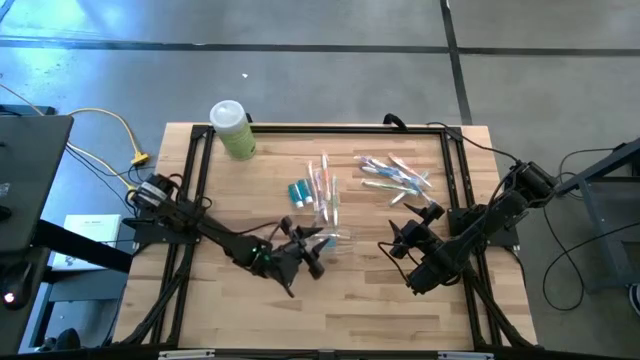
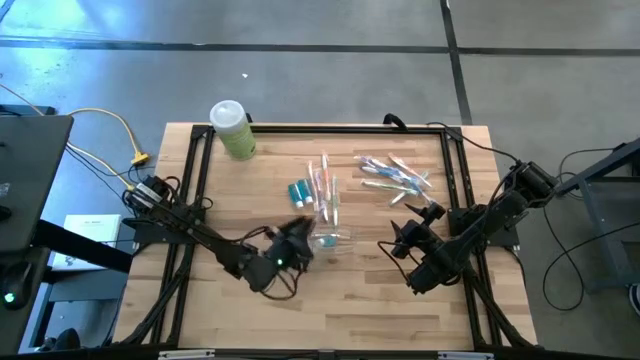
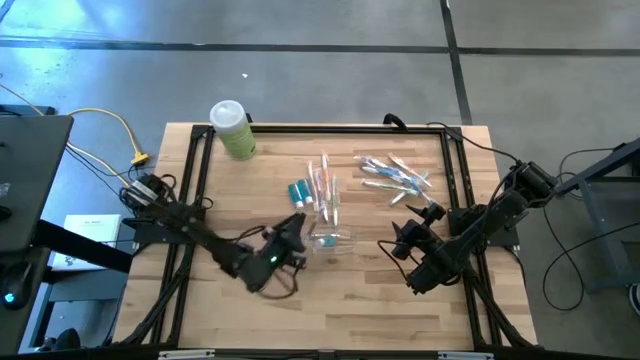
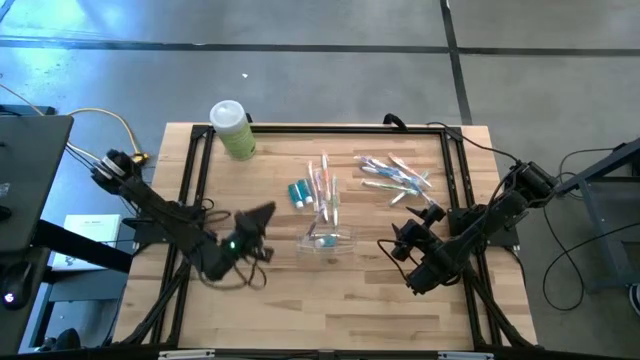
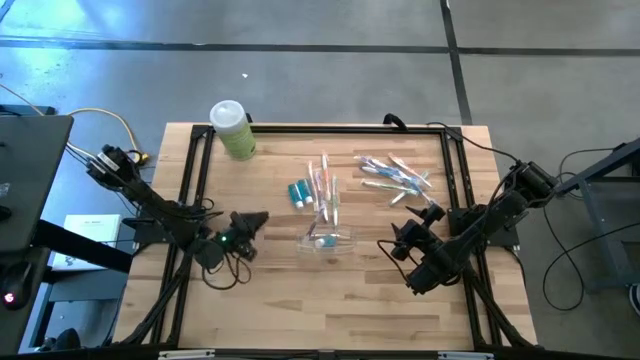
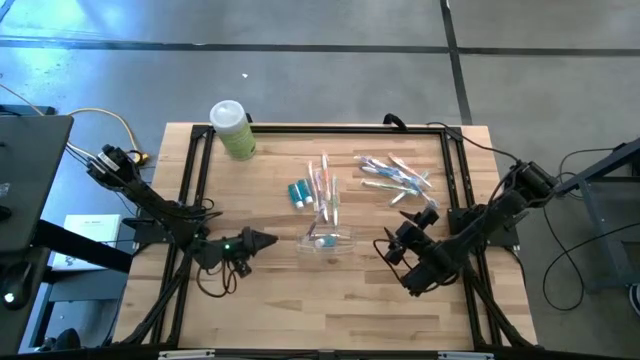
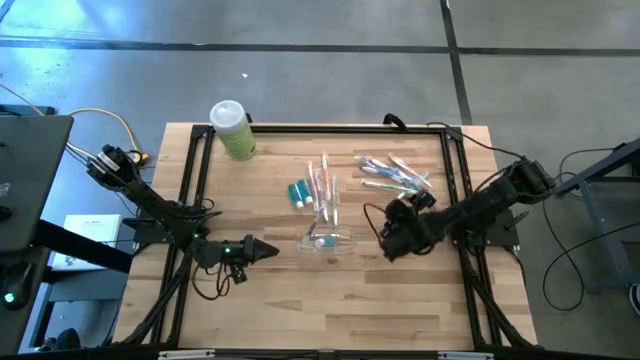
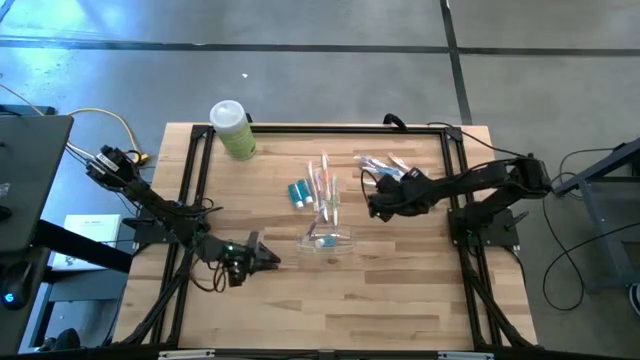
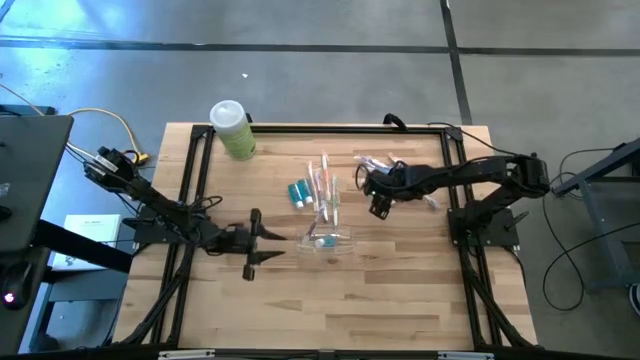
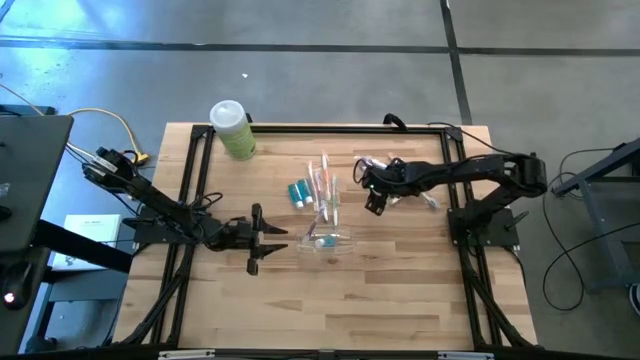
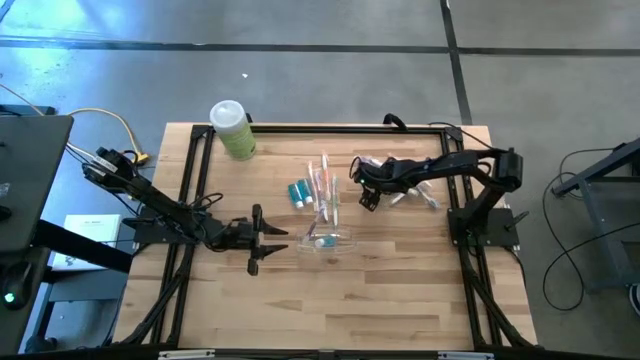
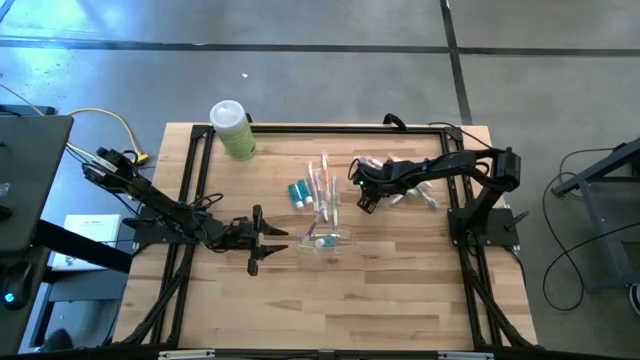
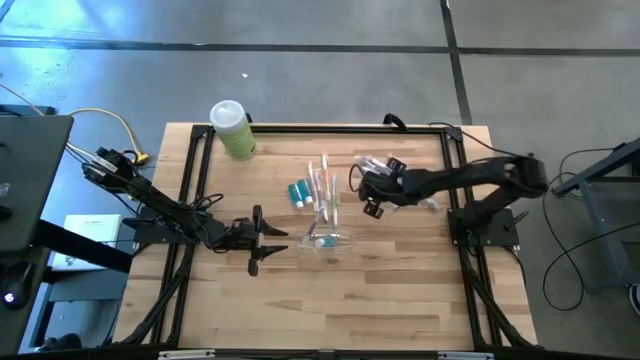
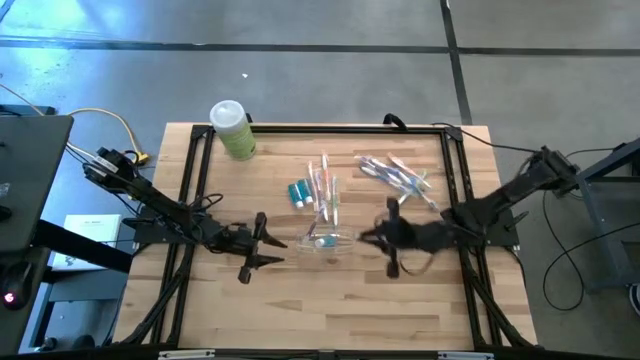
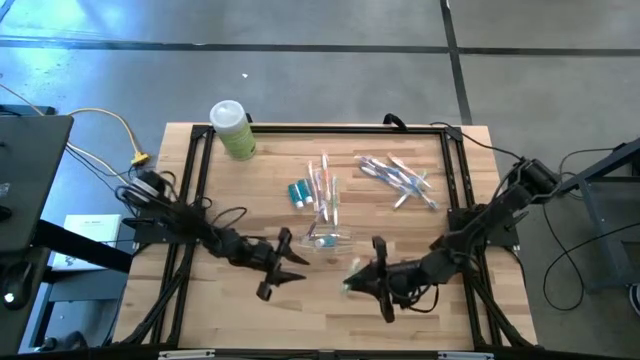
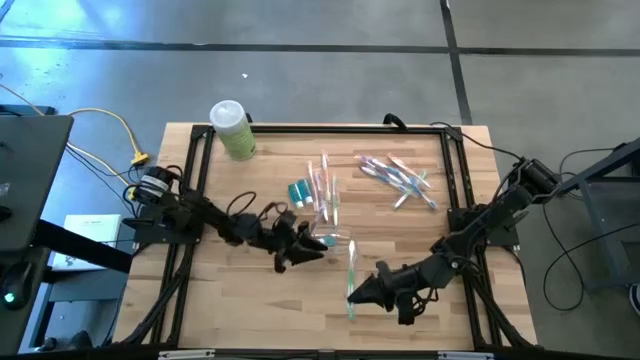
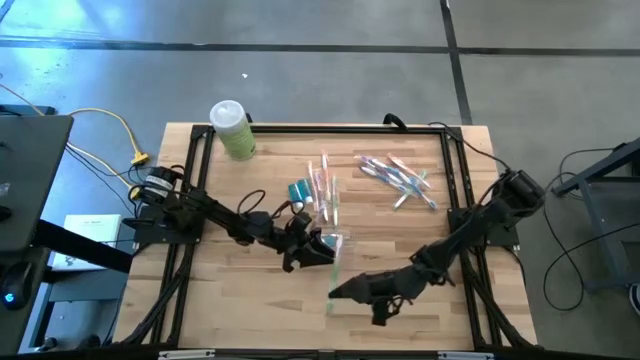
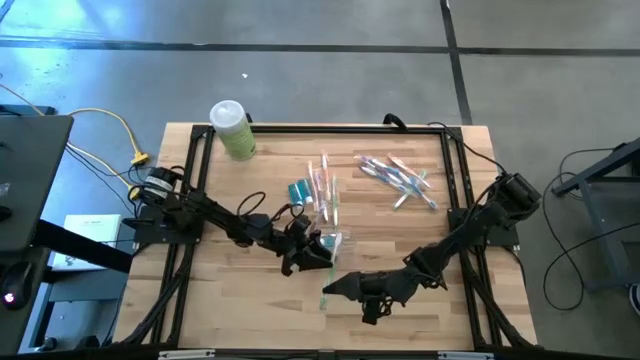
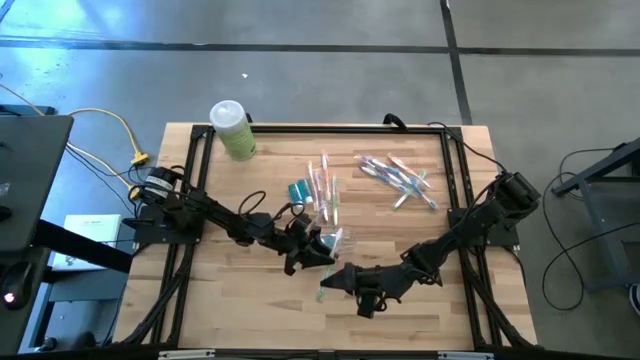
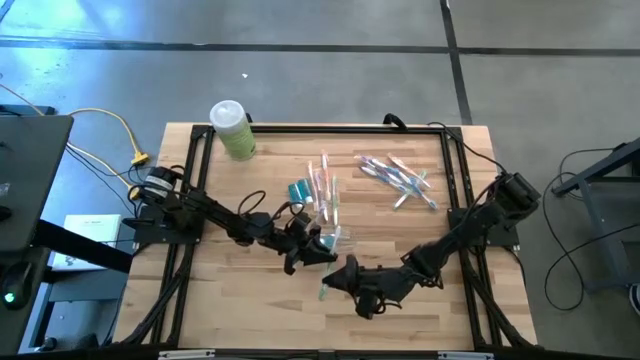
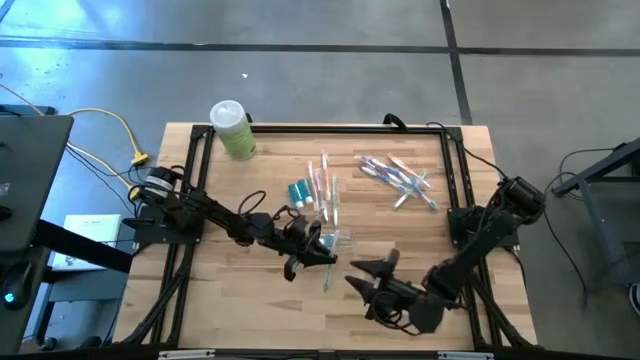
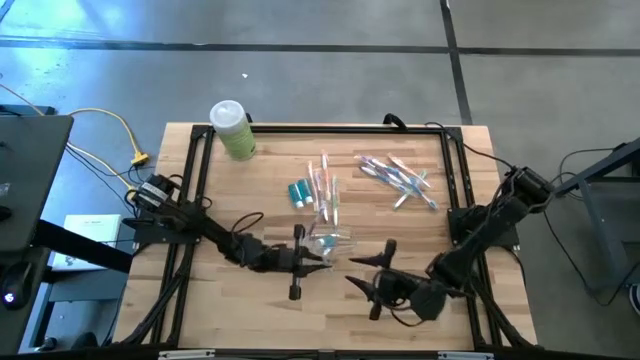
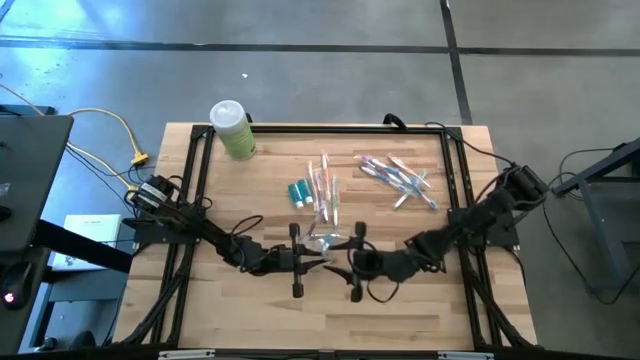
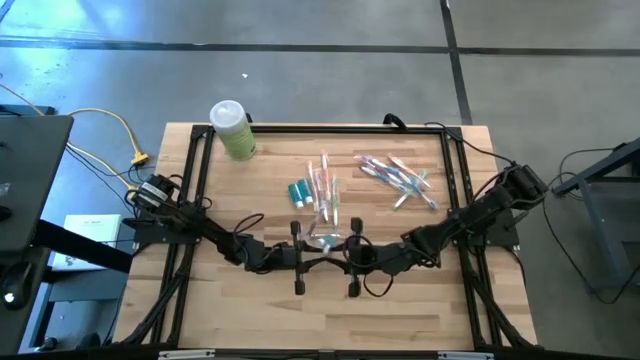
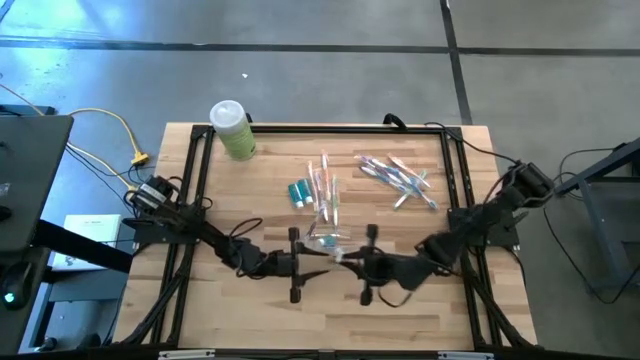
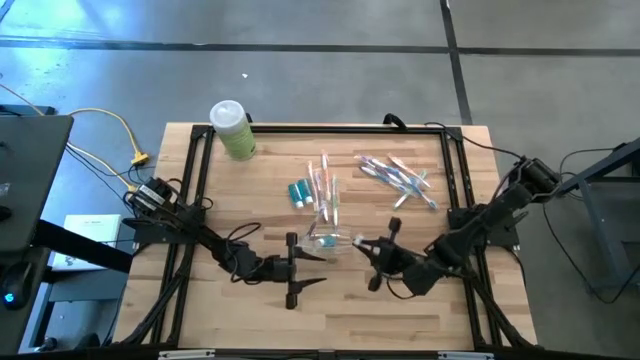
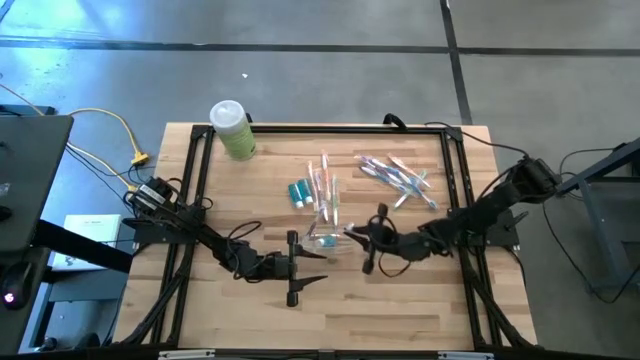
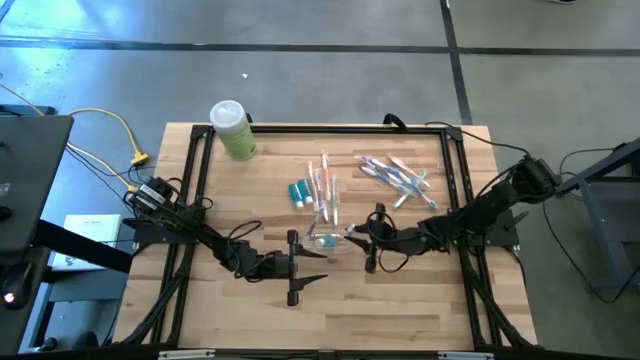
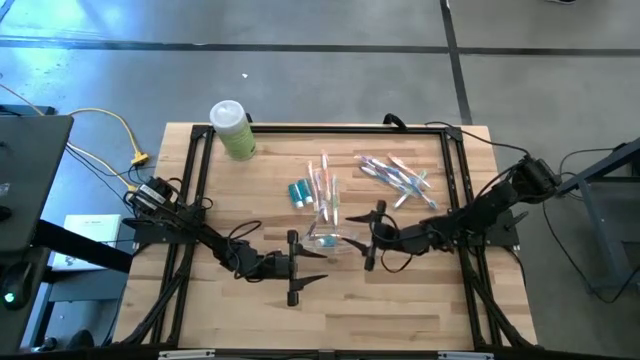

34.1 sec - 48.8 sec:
Task: Pick & Place toothbrushing station
Put the green toothbrush into the transparent organizer

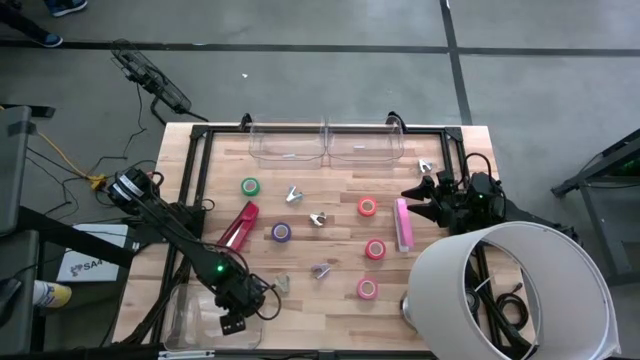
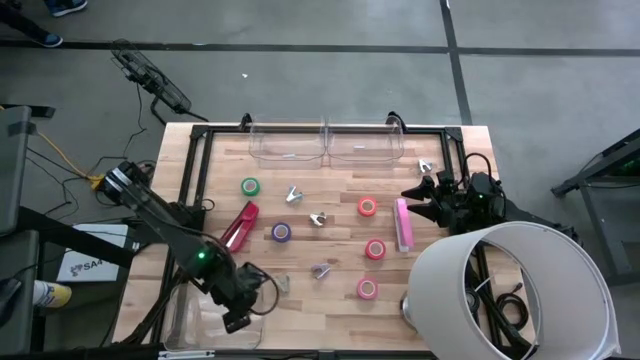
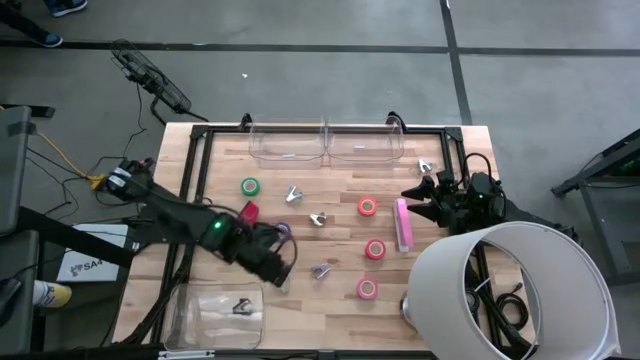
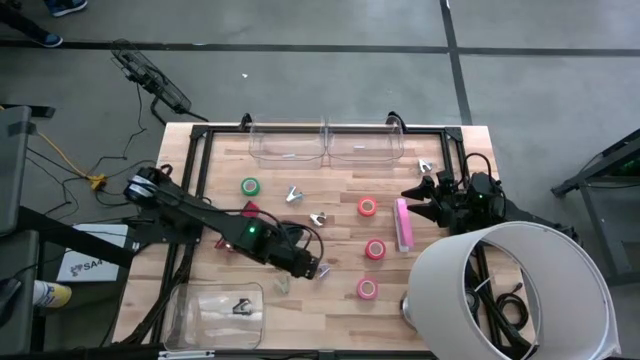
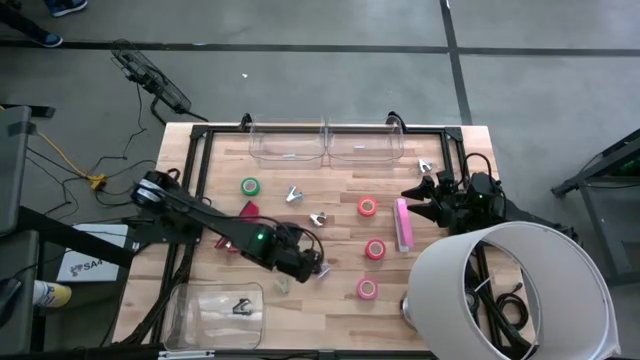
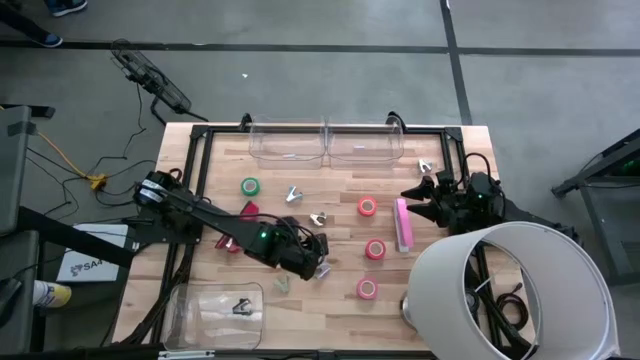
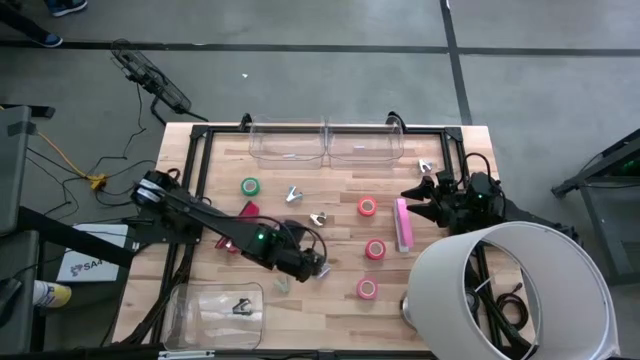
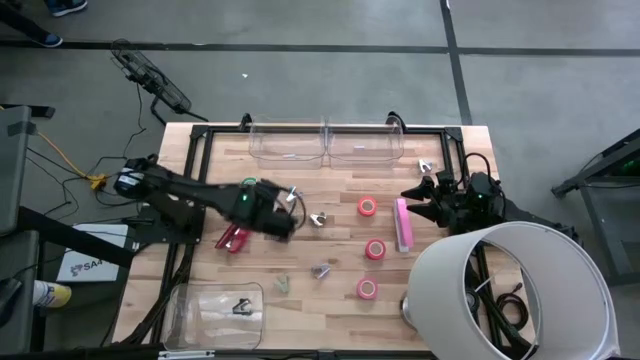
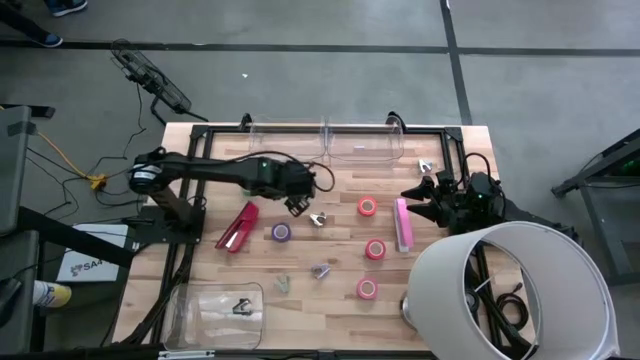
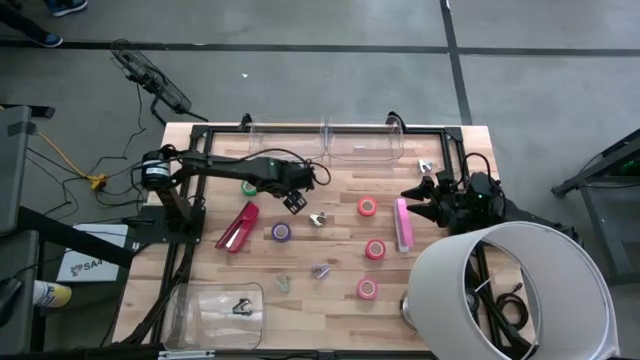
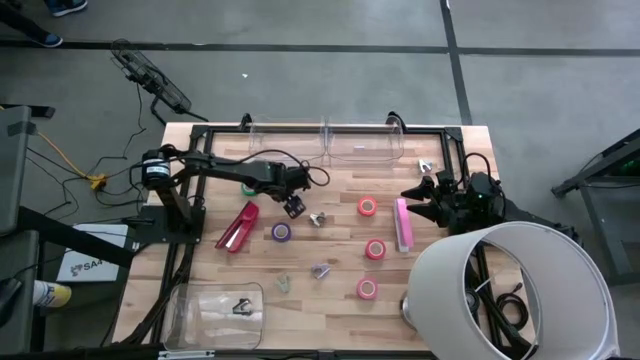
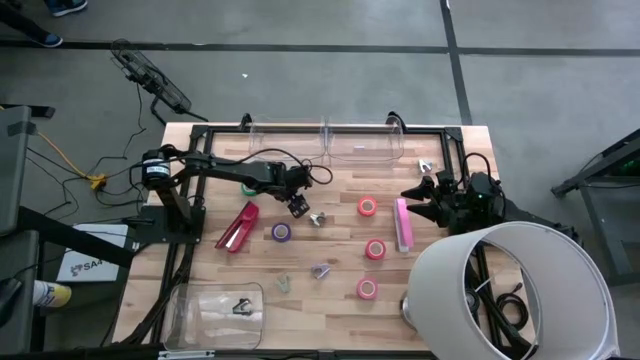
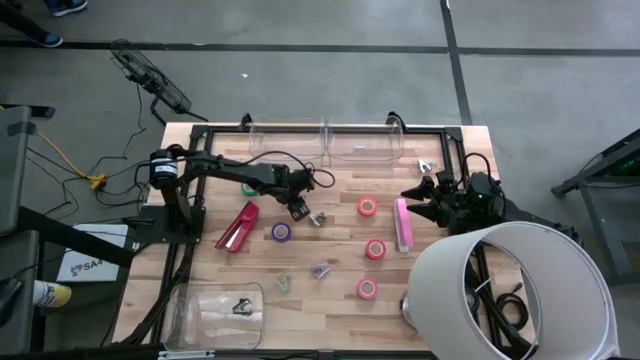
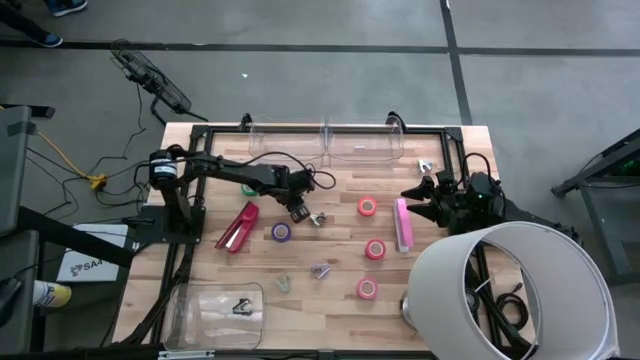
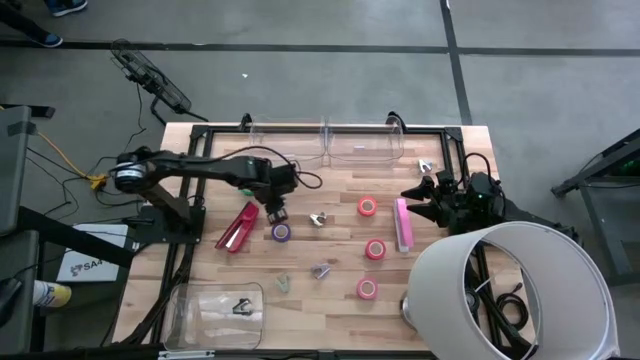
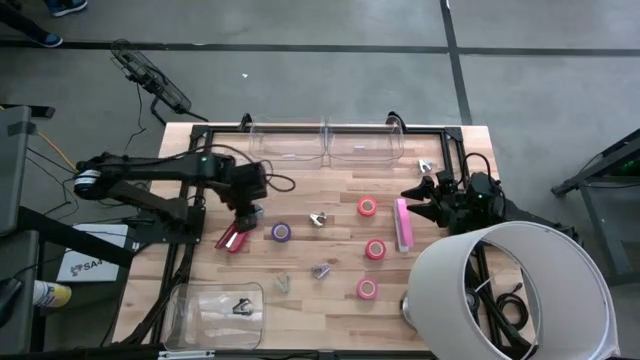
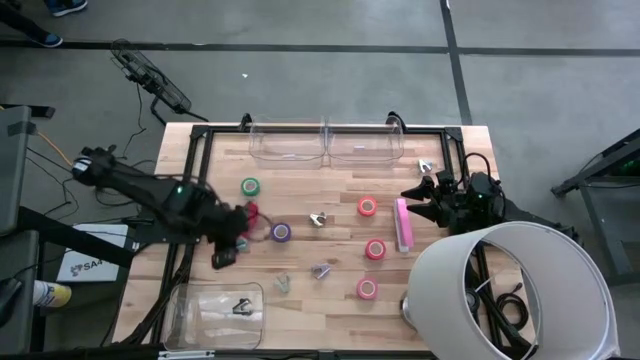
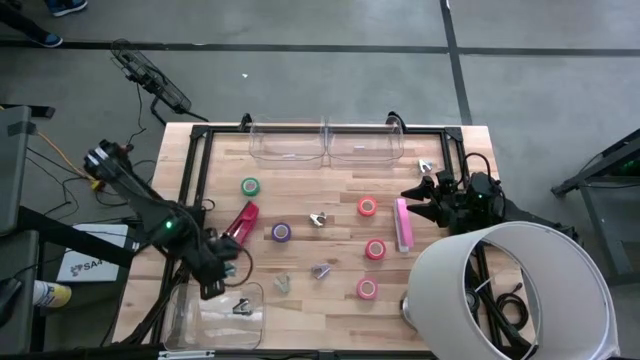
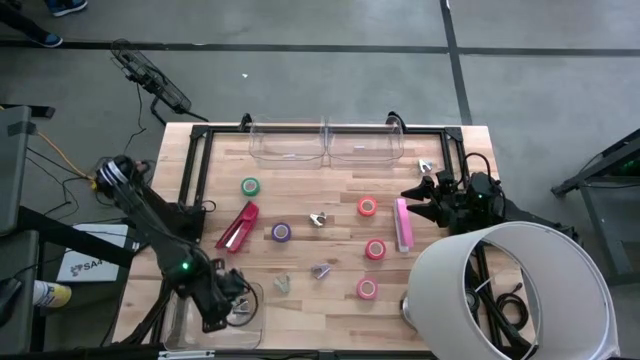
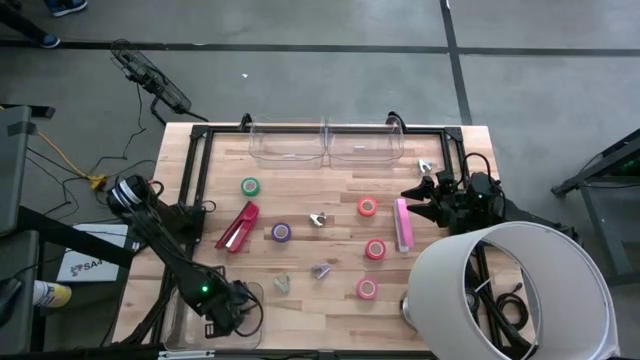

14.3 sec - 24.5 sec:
Task: Pick and place Stapler, Stapler remover, tape
Put the bottom blue stapler remover into the bottom transparent bin
